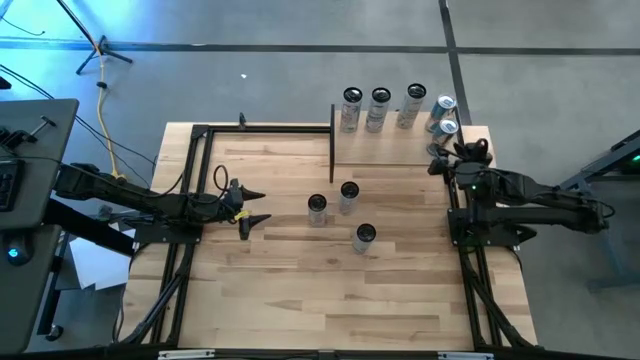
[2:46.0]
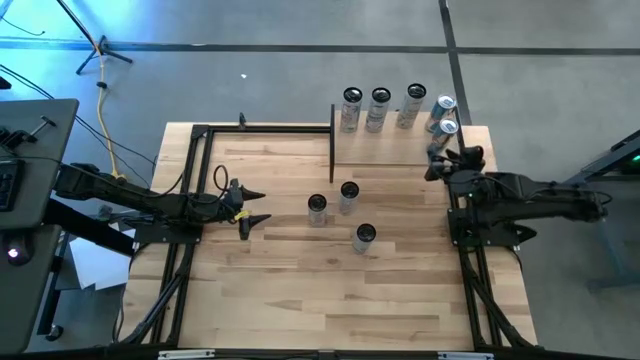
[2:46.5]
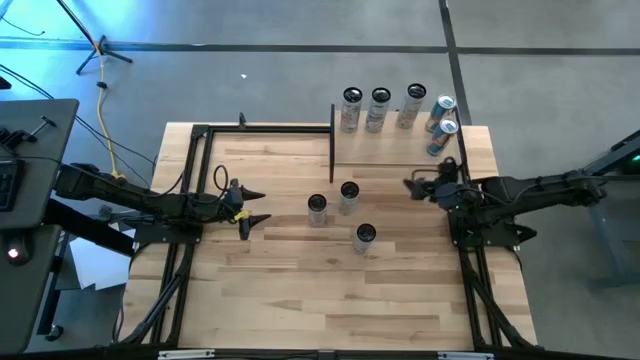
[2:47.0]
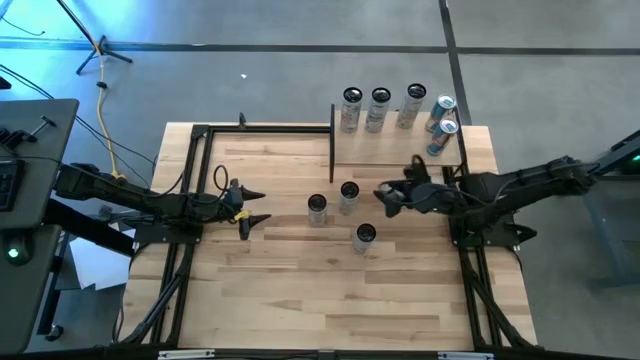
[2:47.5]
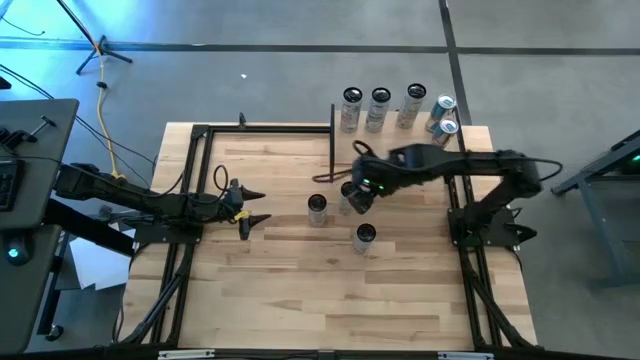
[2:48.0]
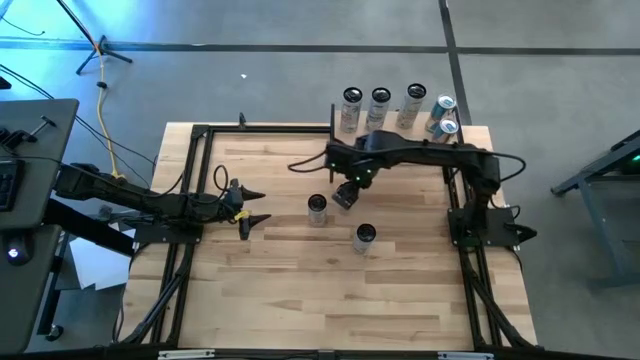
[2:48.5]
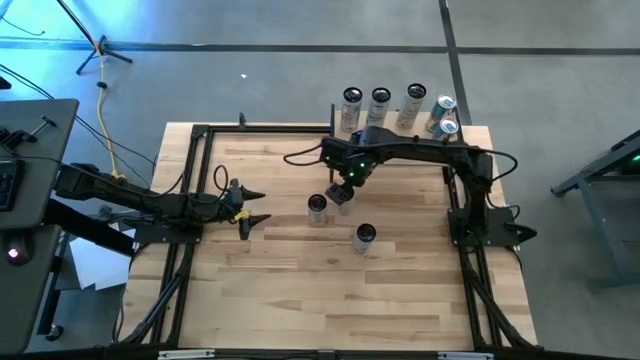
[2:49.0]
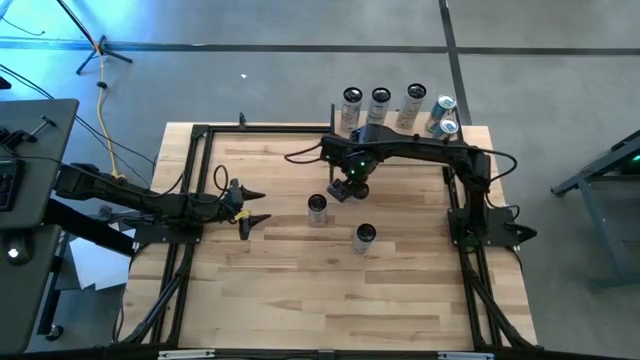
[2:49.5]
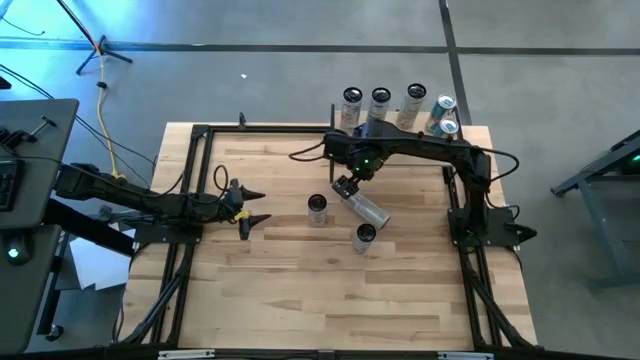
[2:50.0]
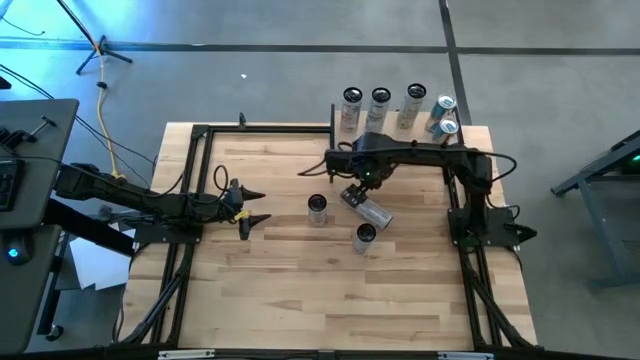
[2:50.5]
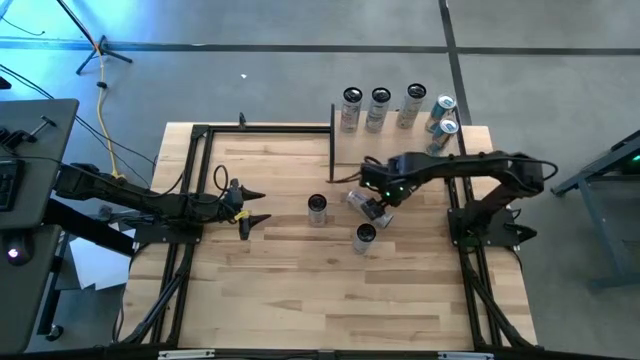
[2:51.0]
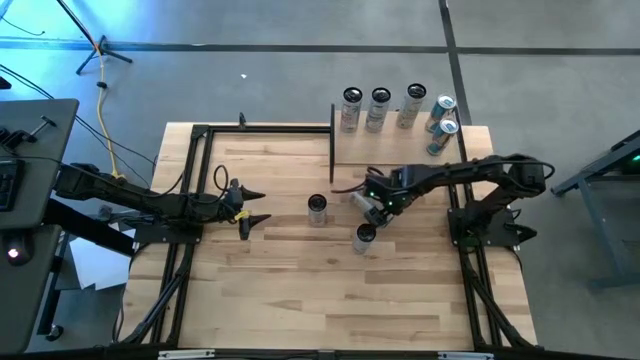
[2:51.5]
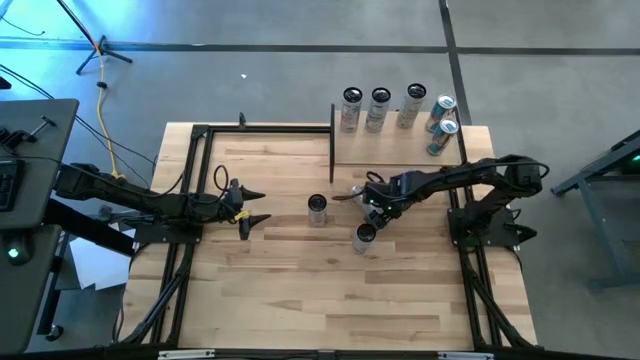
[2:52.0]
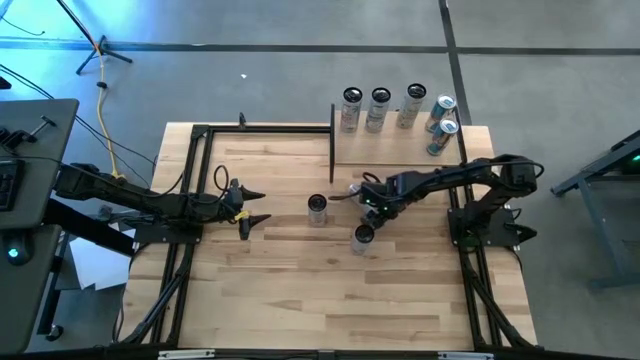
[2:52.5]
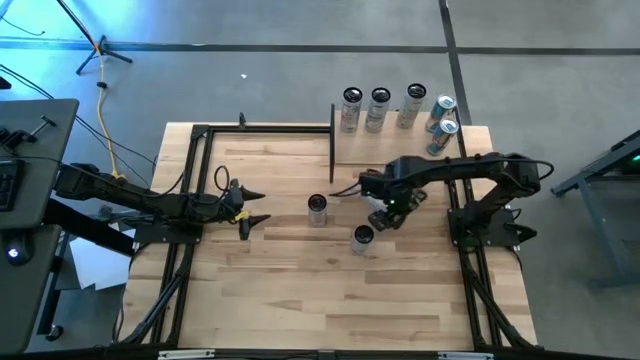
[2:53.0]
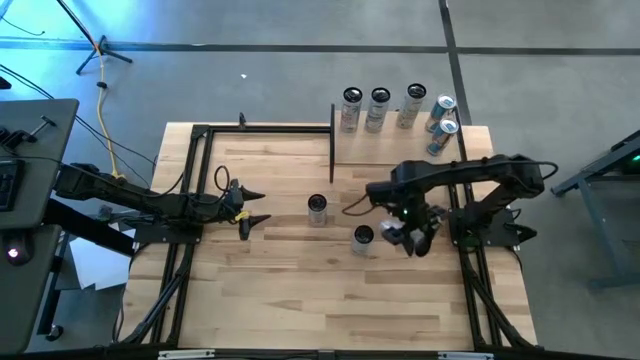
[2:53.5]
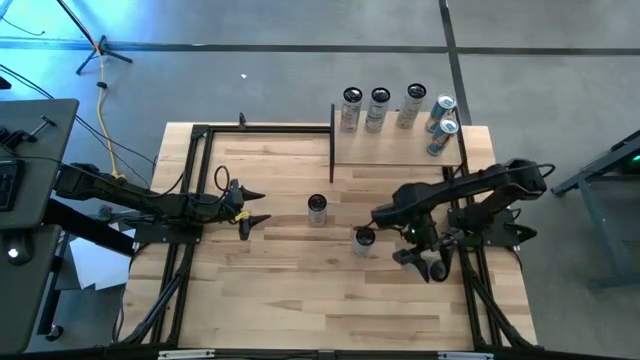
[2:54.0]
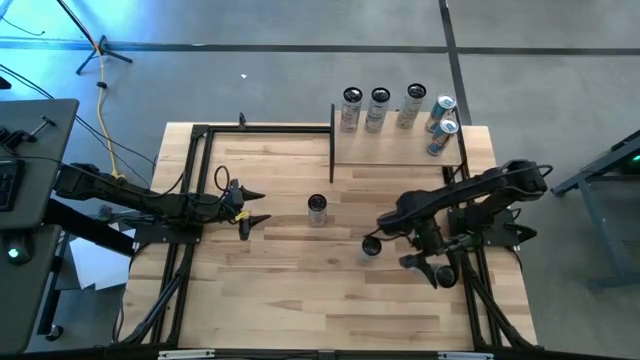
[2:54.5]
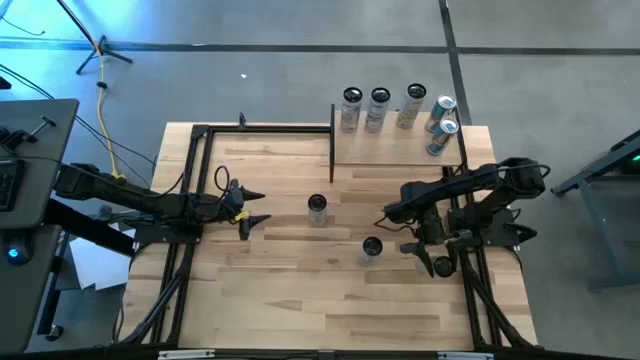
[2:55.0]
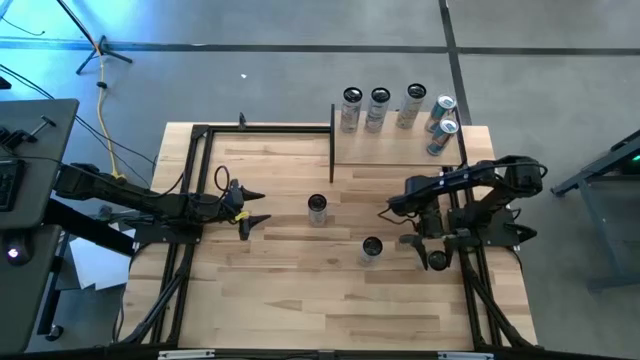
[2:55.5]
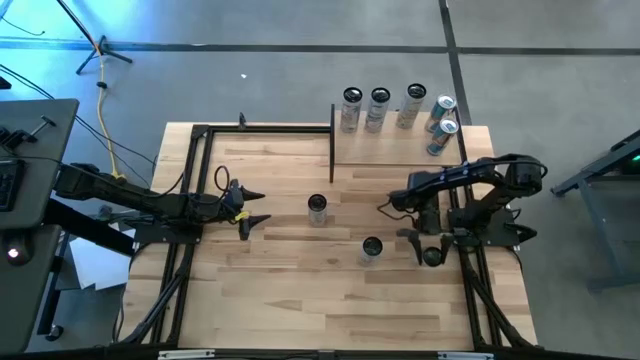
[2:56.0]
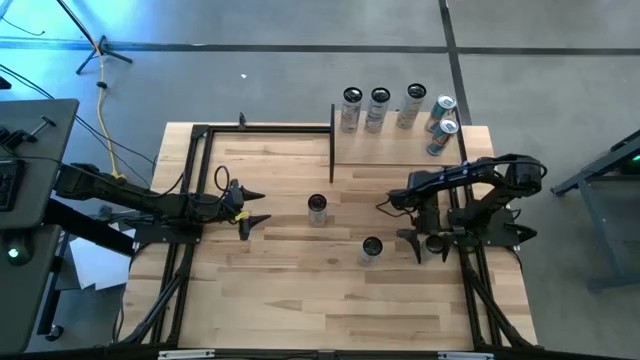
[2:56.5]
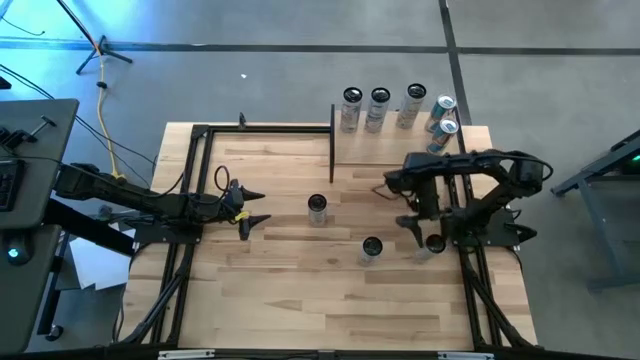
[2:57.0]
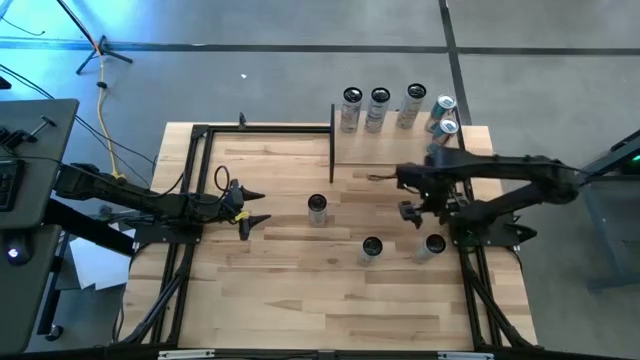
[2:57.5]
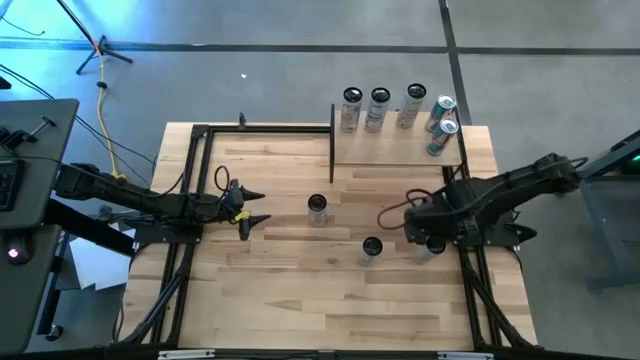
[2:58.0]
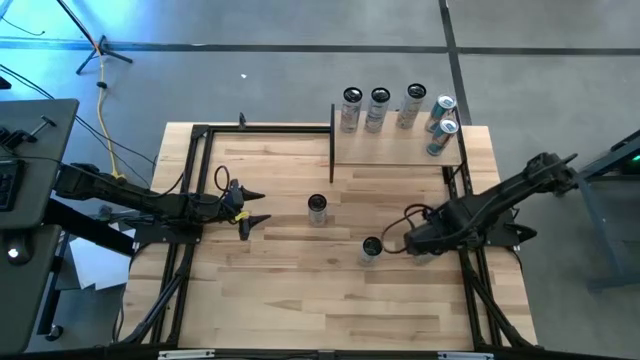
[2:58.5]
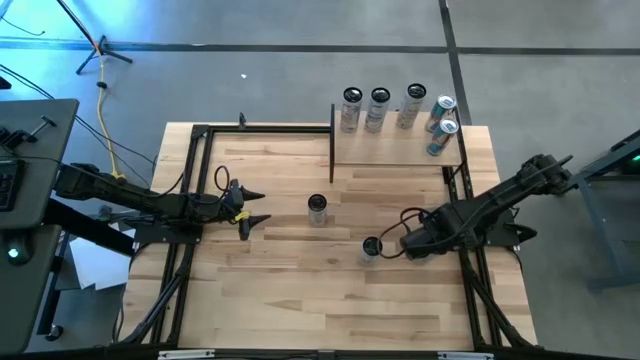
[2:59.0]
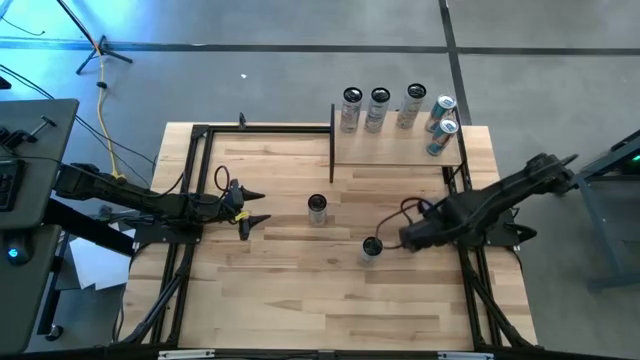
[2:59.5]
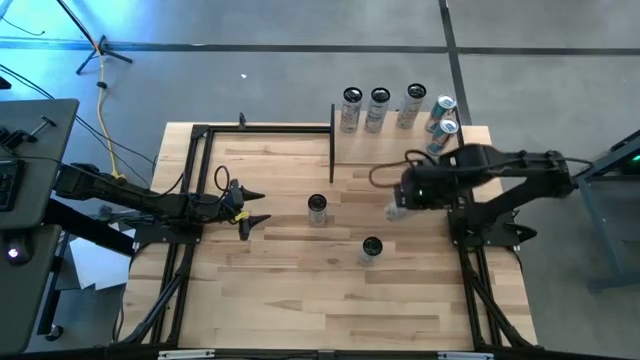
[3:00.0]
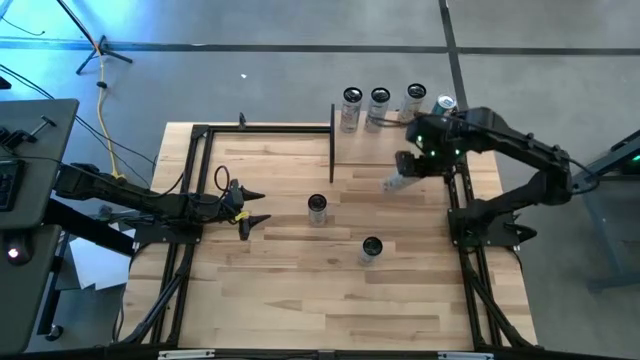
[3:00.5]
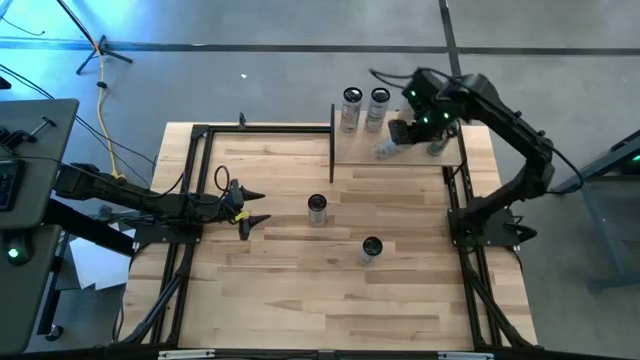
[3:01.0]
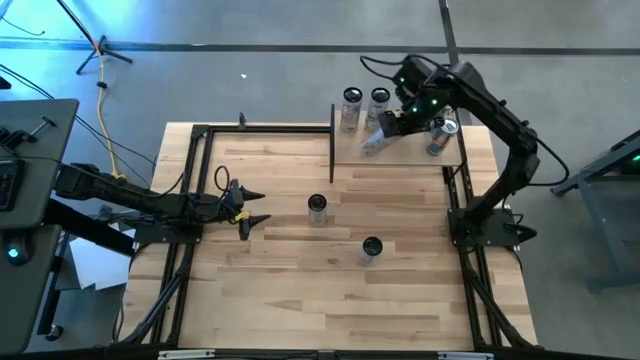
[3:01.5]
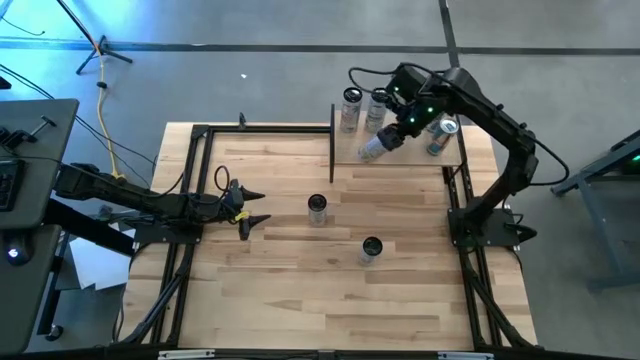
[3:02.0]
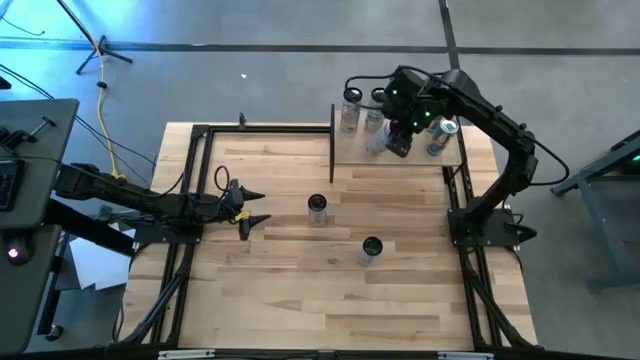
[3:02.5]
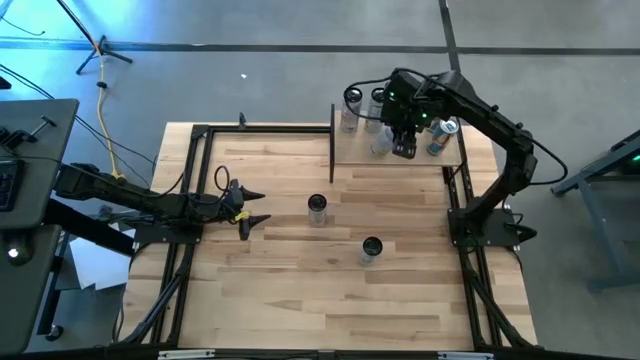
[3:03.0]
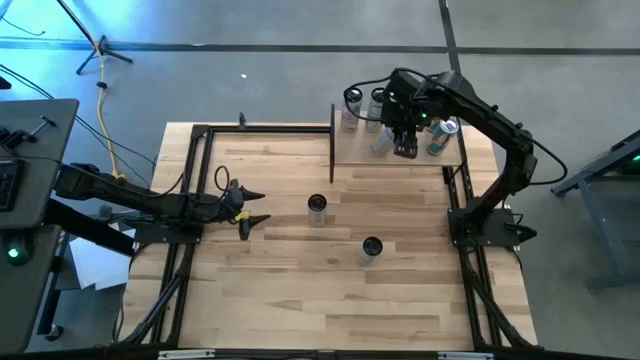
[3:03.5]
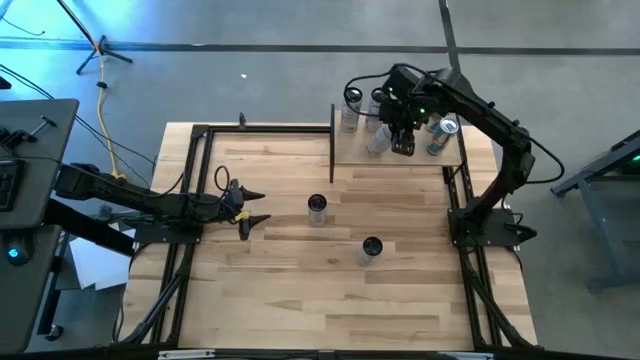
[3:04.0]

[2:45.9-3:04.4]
Task: Place canned beverage on shelf
Put the white yellow soda can on the shelf aligned with the white yellow soda can

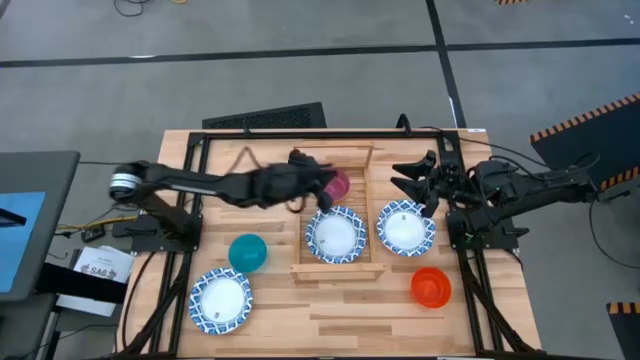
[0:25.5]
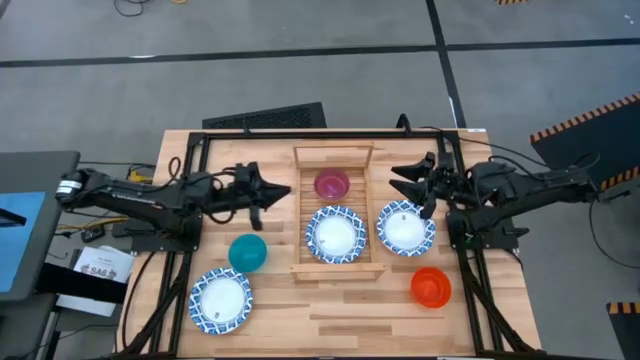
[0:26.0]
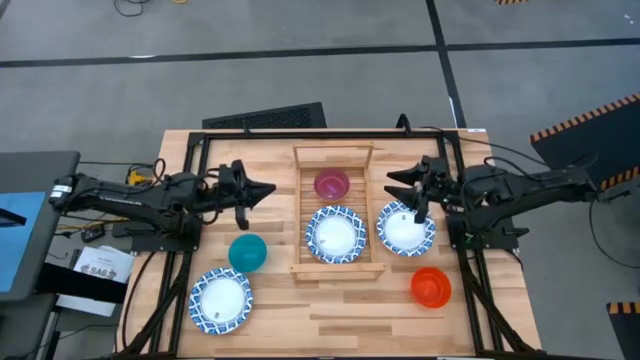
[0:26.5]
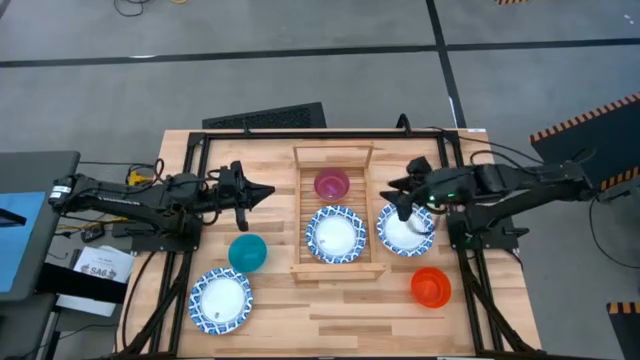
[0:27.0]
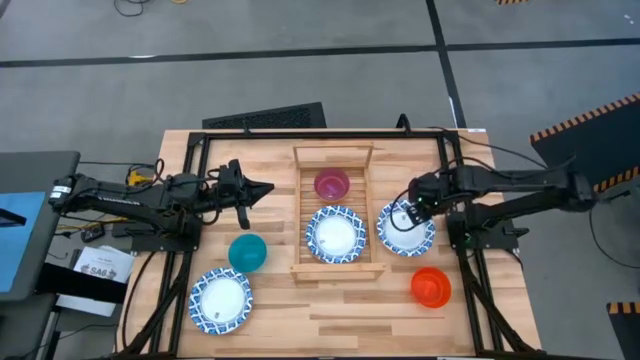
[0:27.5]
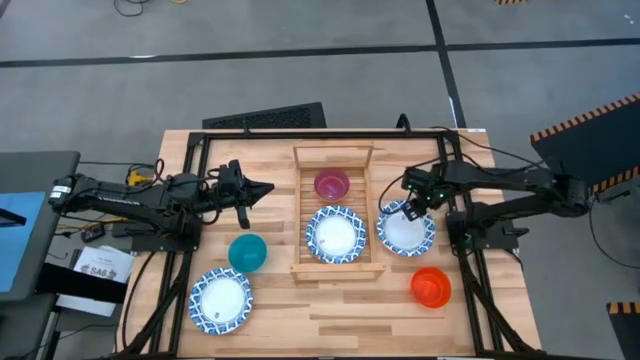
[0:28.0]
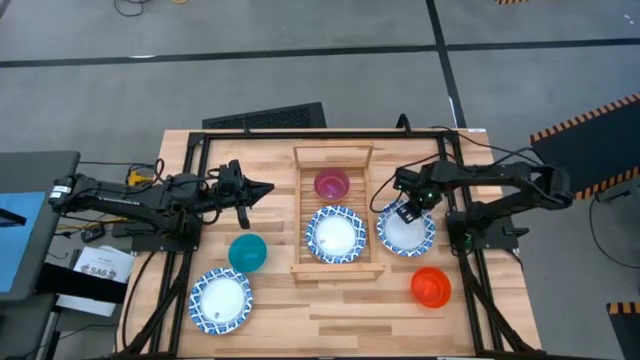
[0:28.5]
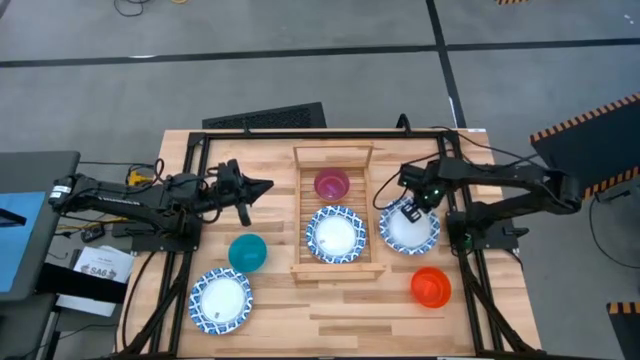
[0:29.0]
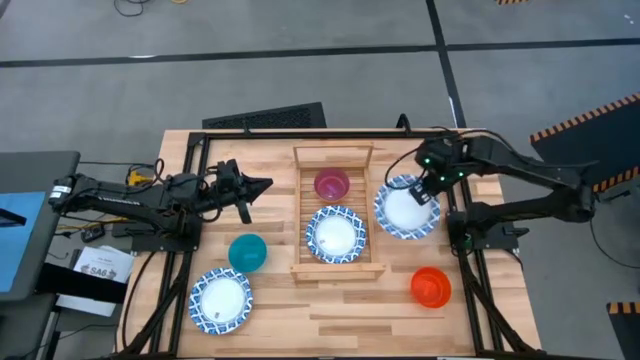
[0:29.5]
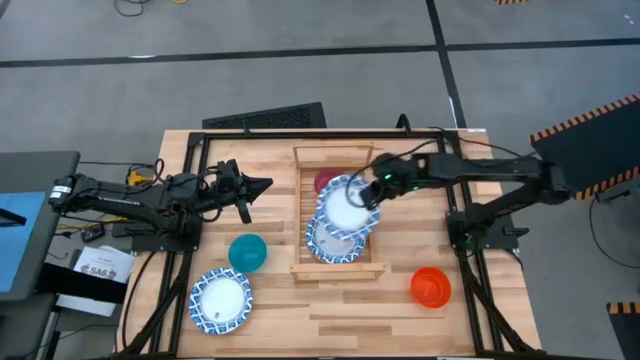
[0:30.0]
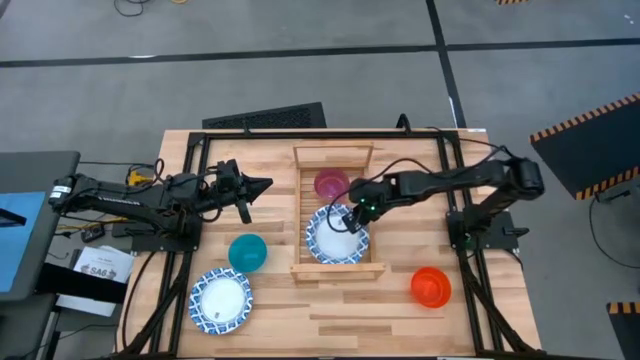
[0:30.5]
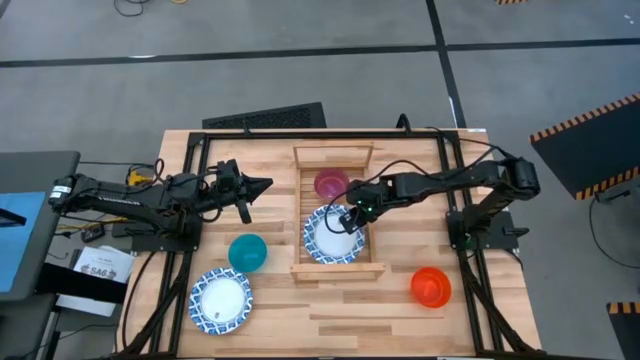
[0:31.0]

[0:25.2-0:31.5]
Task: Place and stack bowls onto a shelf
Stack the right blue patterned bowl on top of the blue patterned bowl on the shelf
